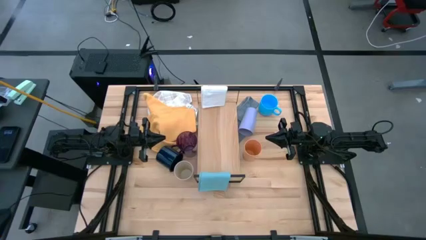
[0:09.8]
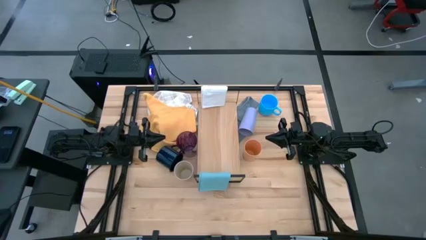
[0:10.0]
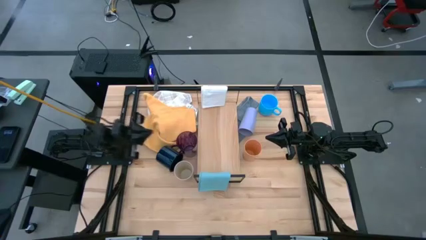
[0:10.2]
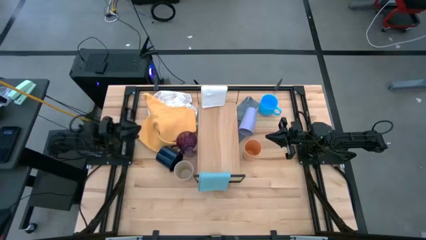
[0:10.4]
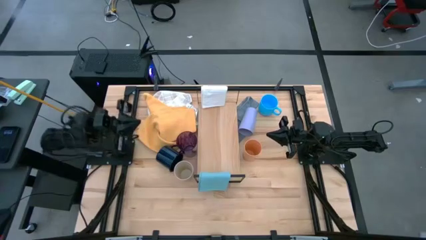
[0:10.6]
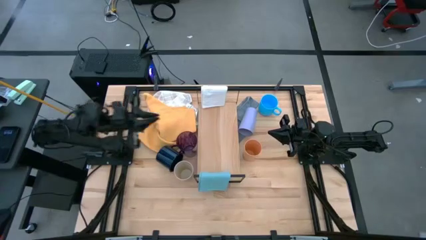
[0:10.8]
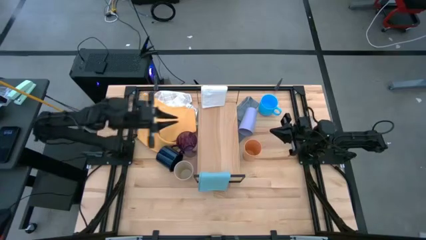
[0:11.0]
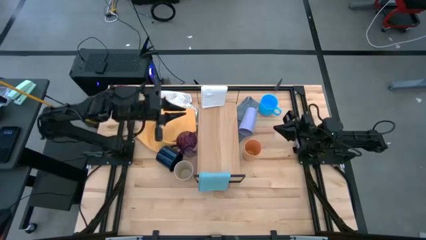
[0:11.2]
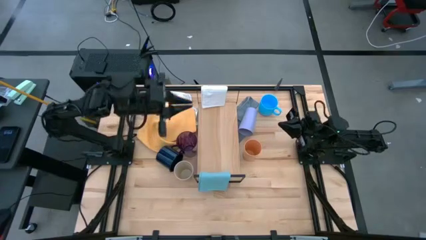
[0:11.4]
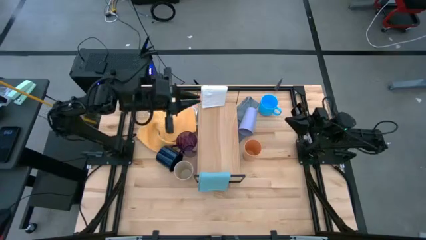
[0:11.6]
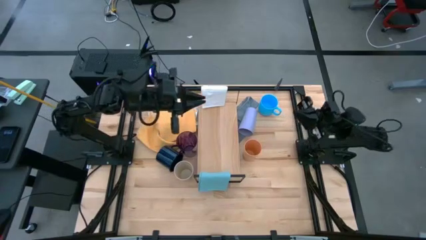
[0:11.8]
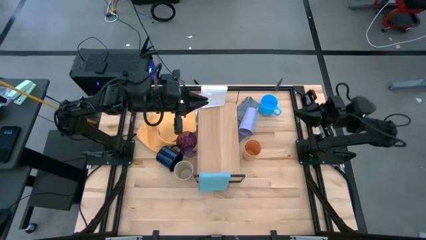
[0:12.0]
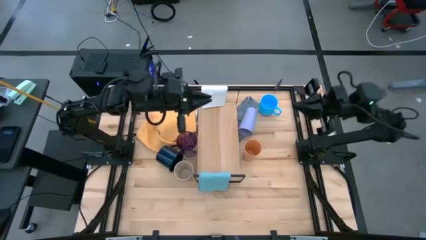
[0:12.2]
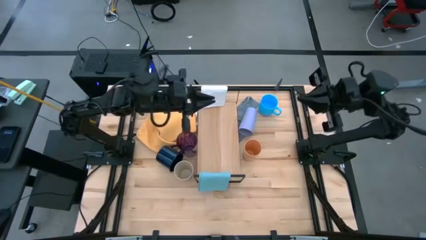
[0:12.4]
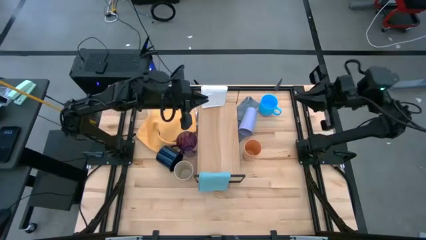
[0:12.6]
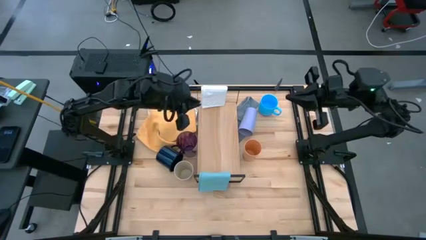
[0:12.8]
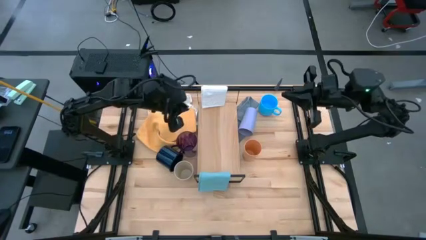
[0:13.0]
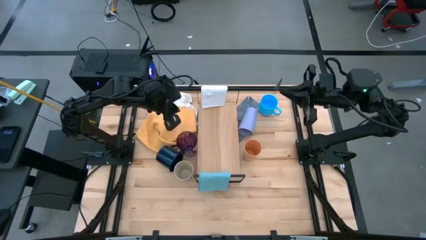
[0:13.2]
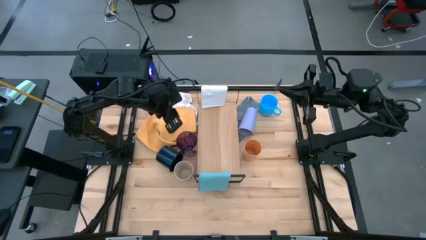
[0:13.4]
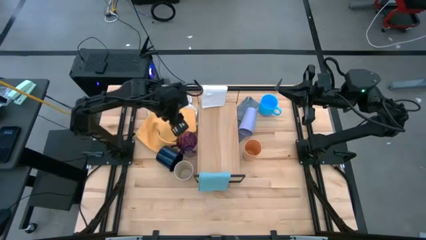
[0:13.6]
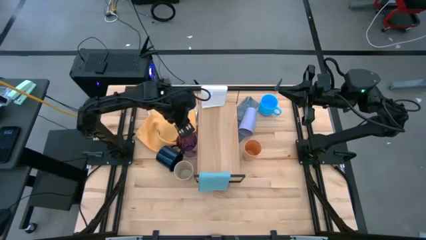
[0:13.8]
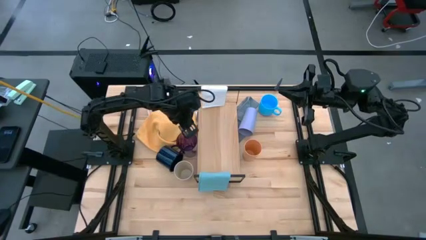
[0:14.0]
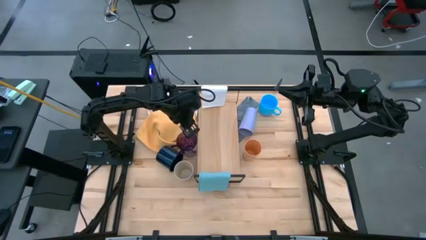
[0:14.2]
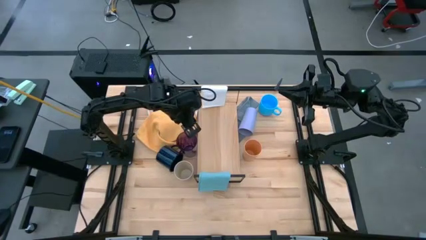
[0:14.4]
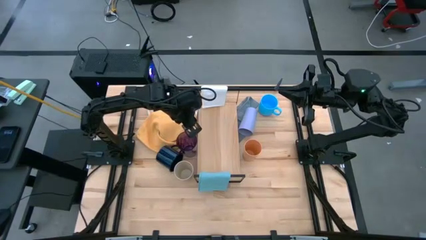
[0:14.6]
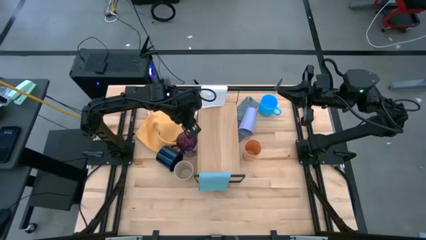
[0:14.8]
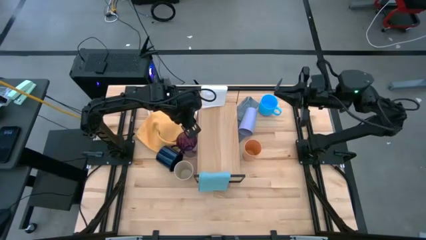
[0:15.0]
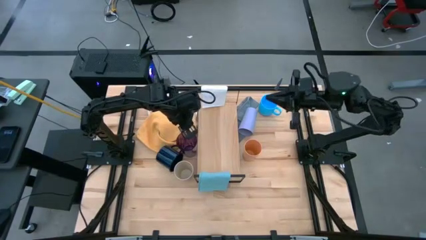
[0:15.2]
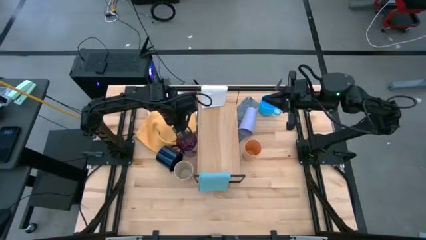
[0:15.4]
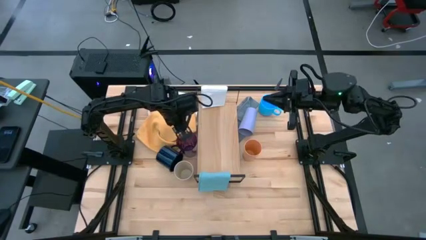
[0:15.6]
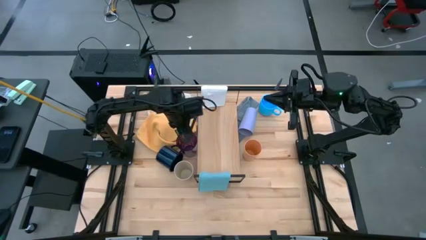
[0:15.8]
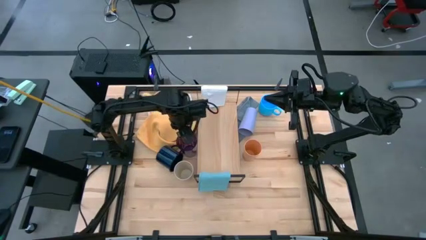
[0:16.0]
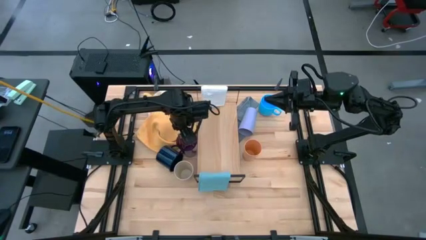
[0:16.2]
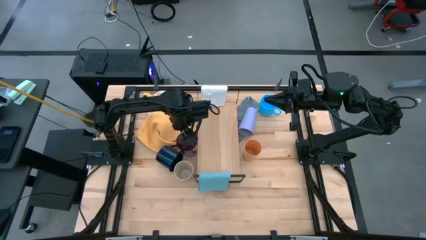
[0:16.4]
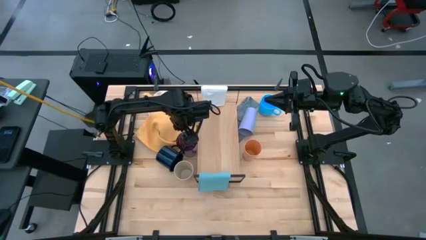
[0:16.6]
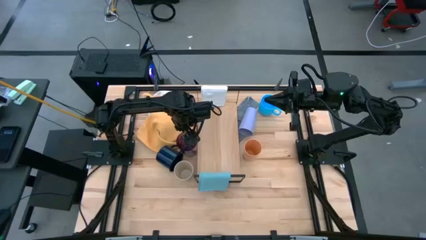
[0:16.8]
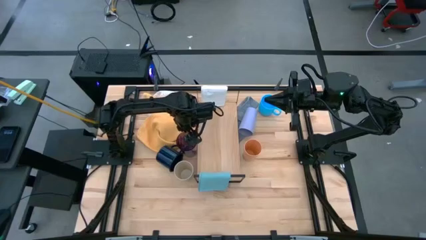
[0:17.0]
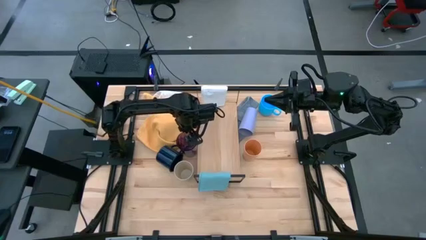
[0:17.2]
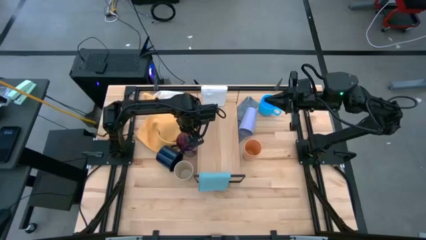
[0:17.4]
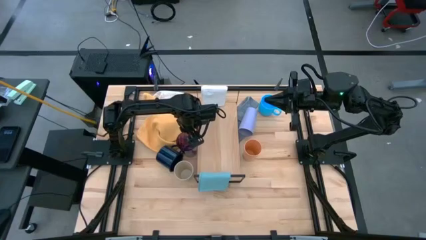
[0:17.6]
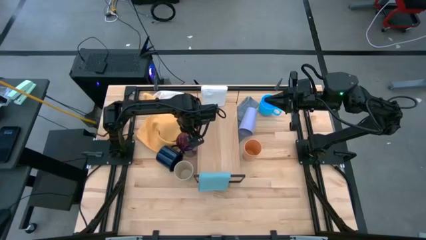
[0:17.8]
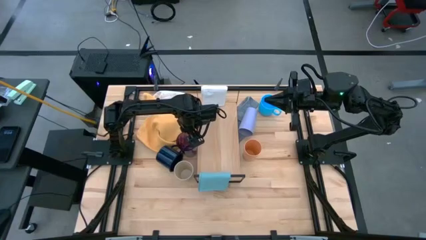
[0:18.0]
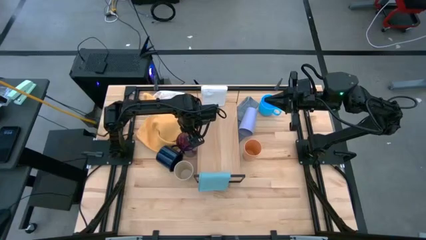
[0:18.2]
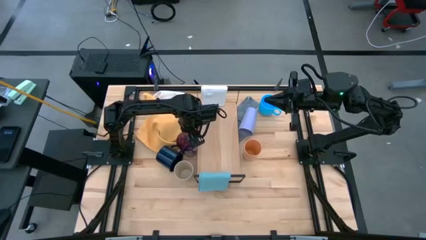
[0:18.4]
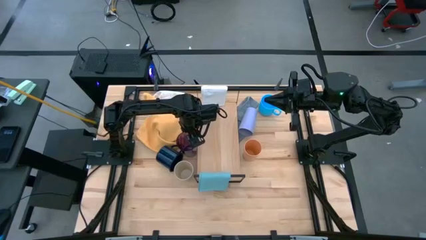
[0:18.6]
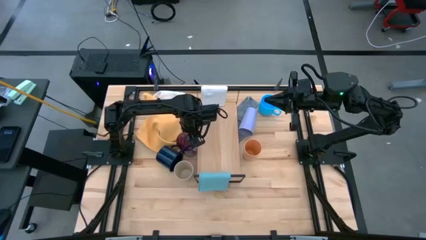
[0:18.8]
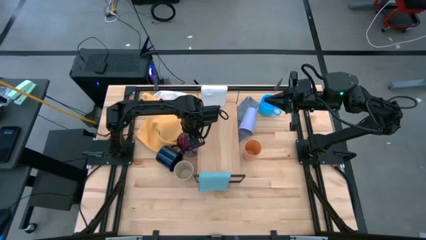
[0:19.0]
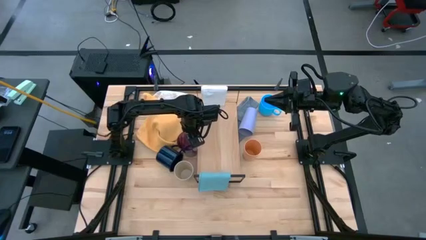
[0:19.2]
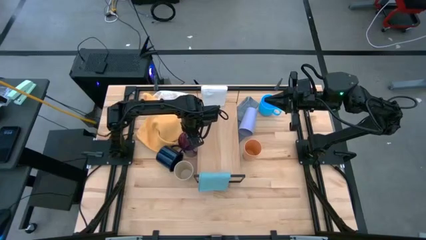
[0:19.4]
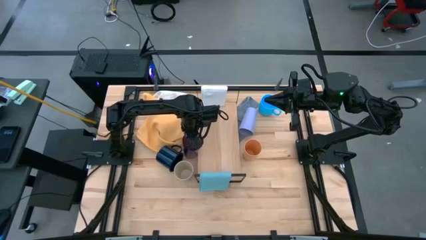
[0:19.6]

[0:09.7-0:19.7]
Task: Stack small to large cups/mugs on shelf
Put the violet cup on the shelf
